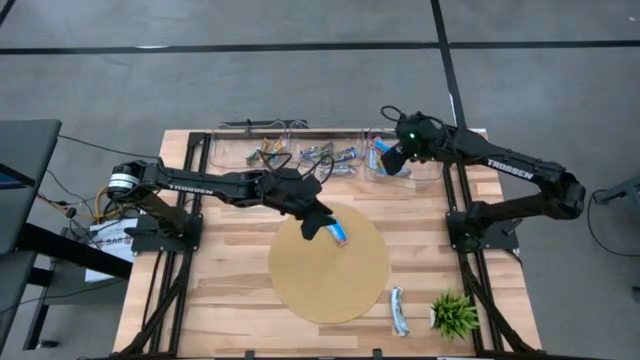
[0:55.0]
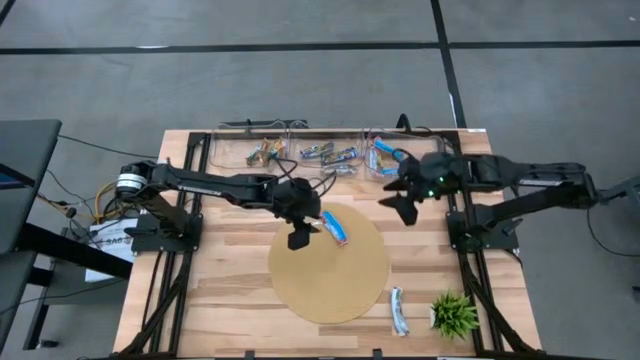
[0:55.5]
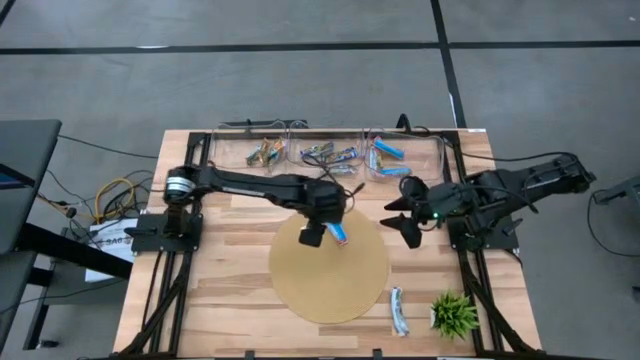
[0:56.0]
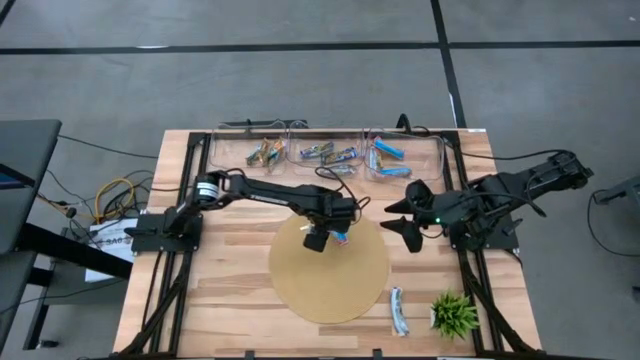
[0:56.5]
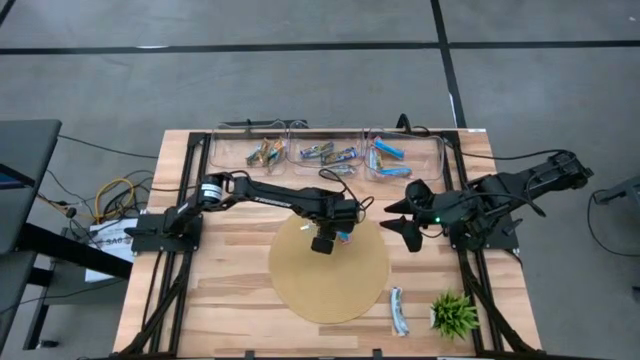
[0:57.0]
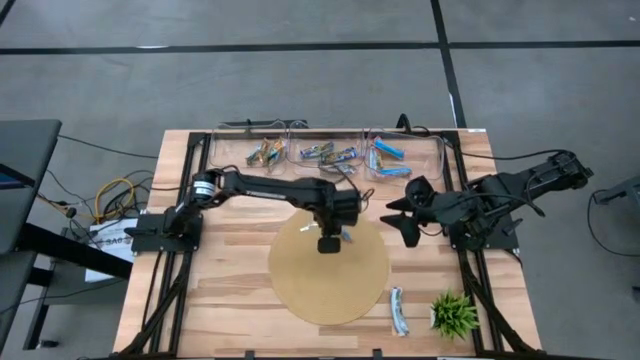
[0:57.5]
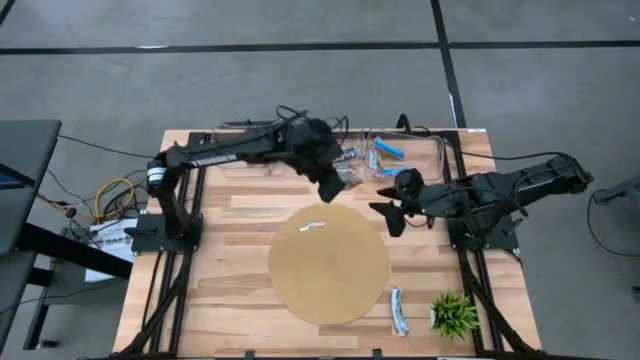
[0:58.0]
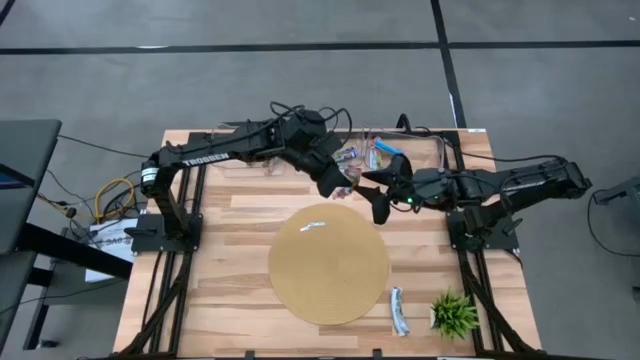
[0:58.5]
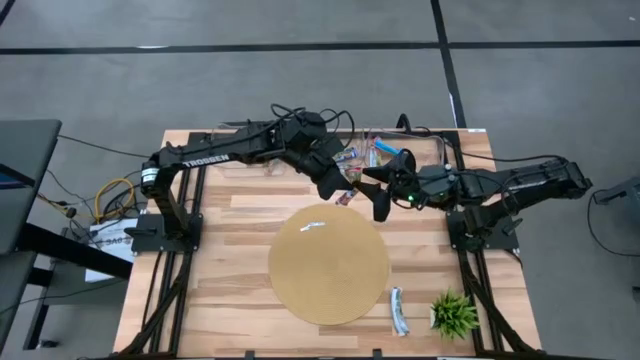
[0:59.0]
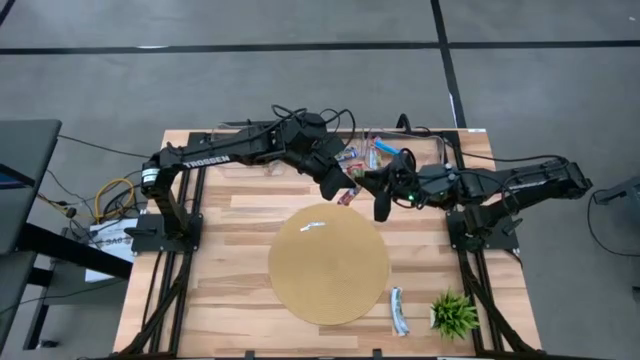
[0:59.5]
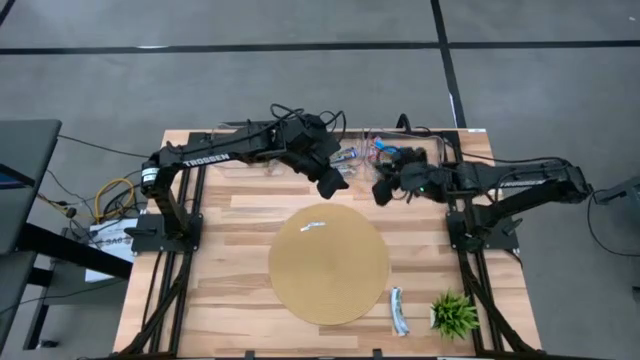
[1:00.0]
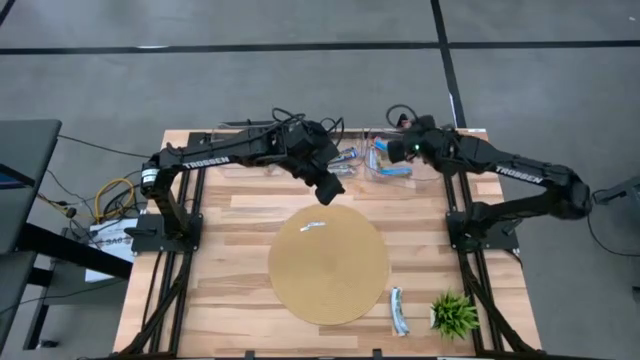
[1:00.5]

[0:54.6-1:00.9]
Task: Pick and place Granola Bars by type
Put the red granola bar into the top right transparent bin

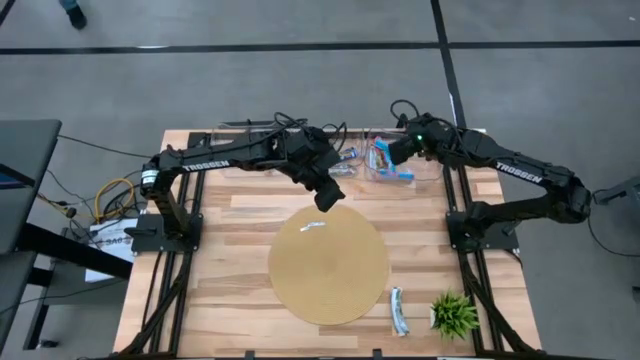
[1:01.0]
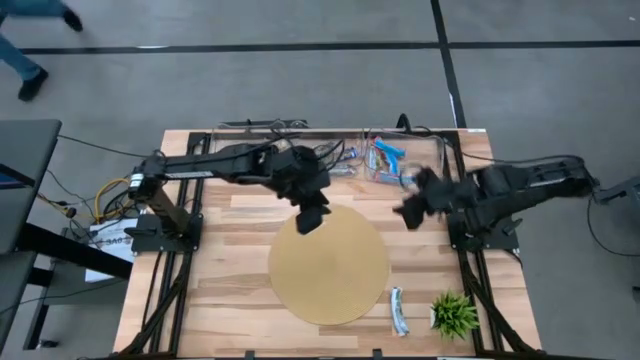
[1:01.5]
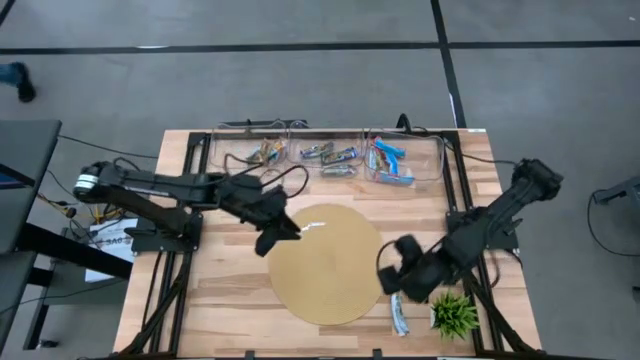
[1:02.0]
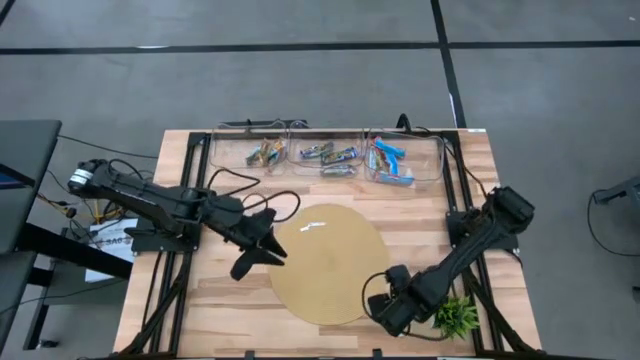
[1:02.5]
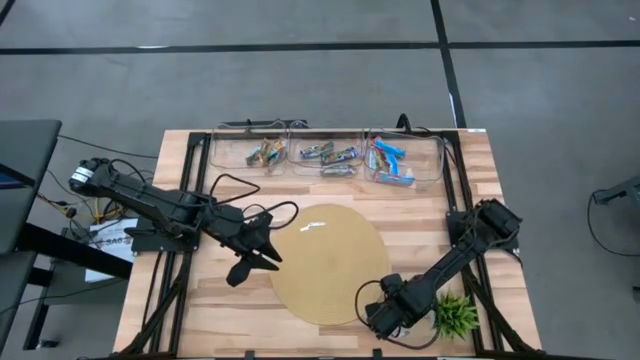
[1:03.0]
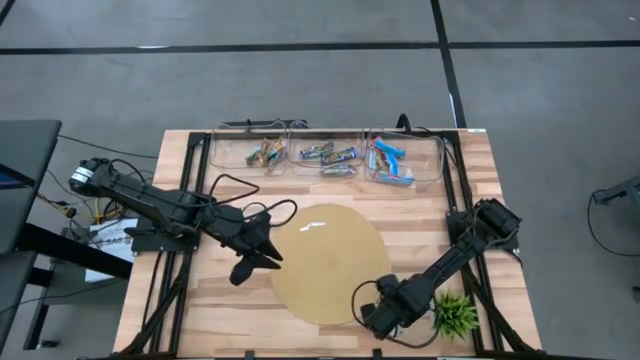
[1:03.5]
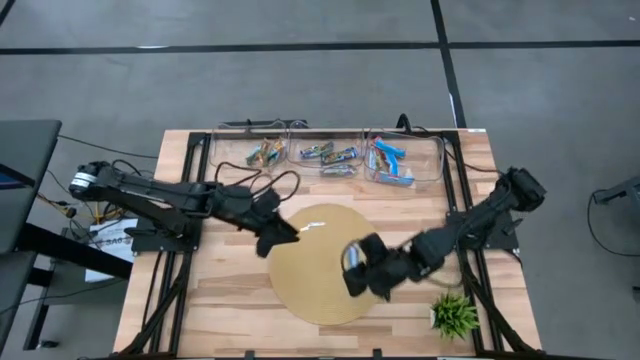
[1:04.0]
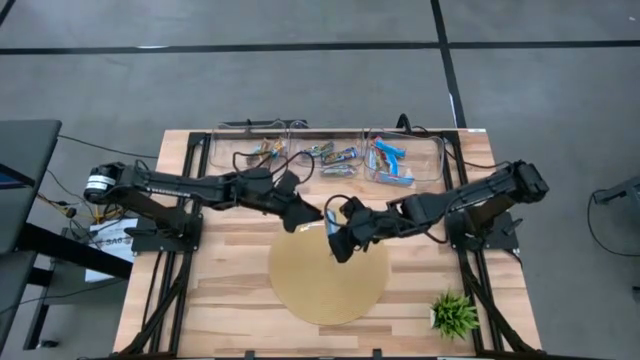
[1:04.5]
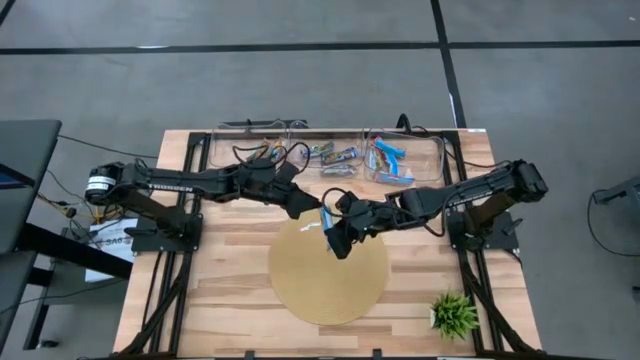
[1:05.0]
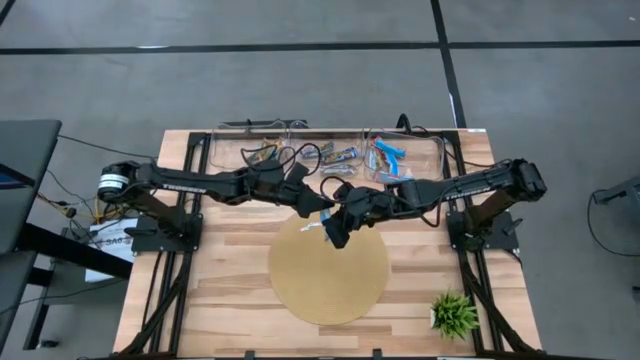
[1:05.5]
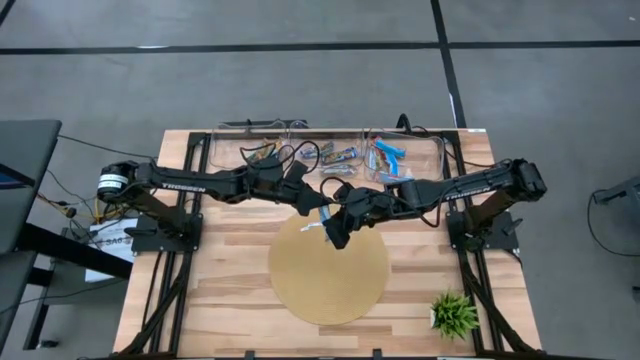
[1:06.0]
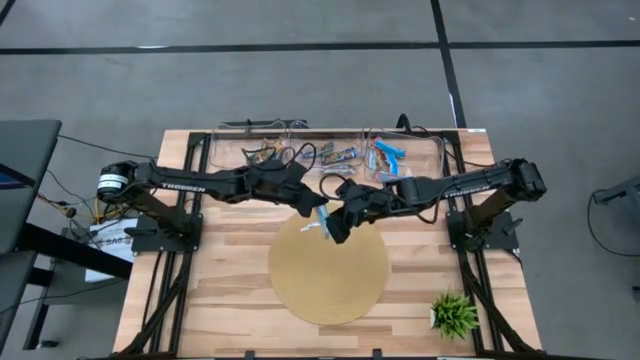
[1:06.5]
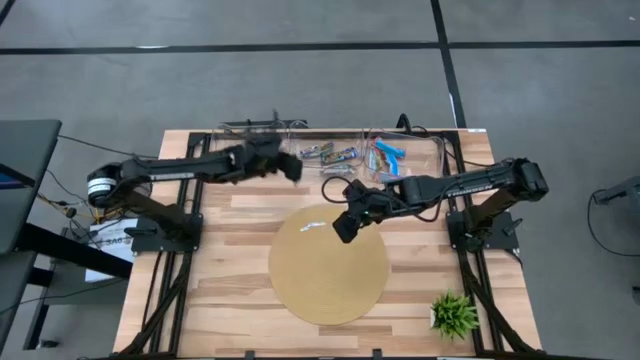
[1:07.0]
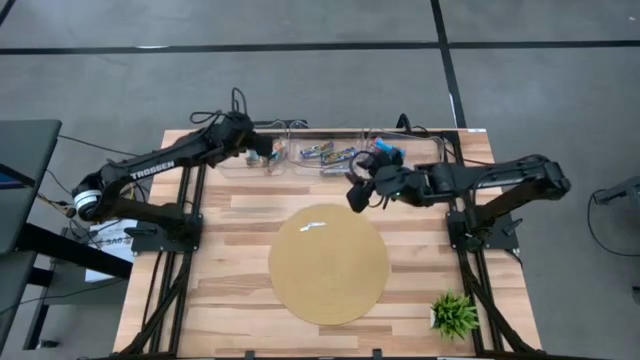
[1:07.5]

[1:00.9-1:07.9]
Put the yellow granola bar into the top left transparent bin

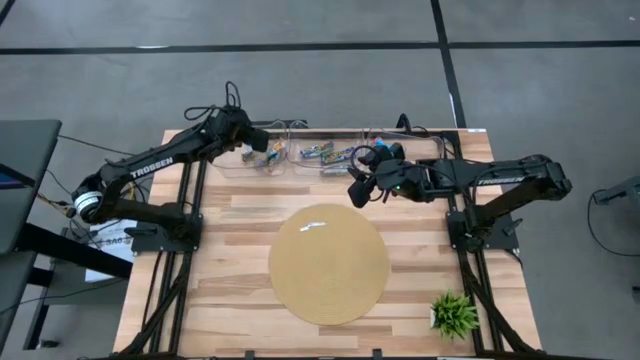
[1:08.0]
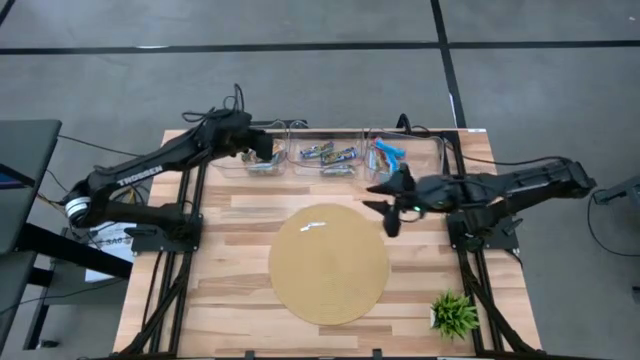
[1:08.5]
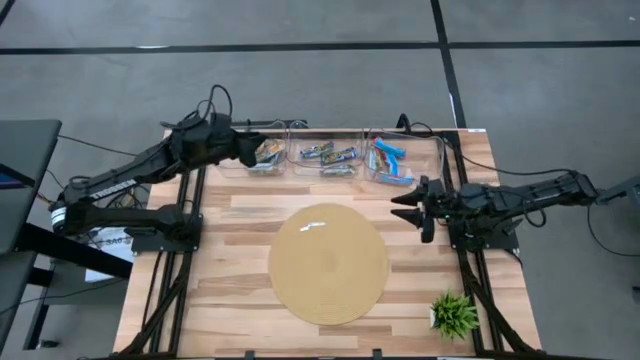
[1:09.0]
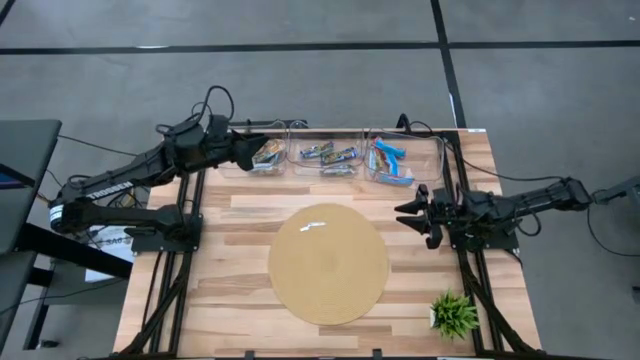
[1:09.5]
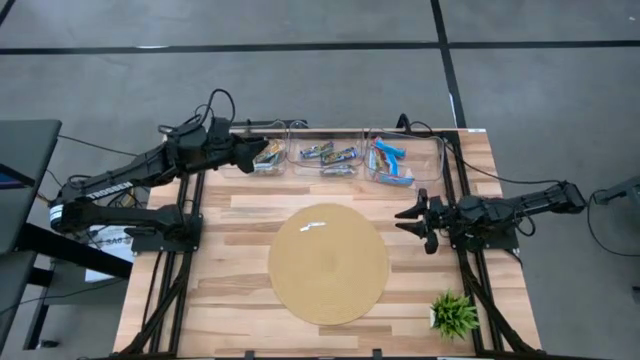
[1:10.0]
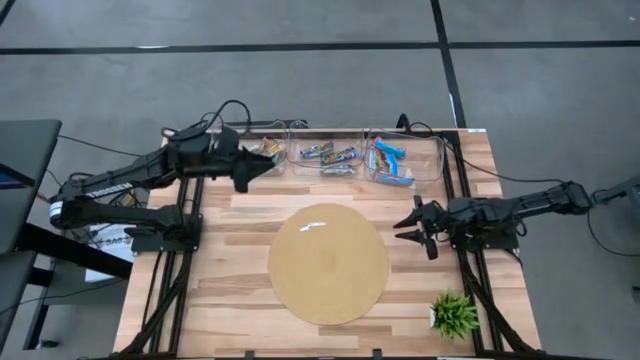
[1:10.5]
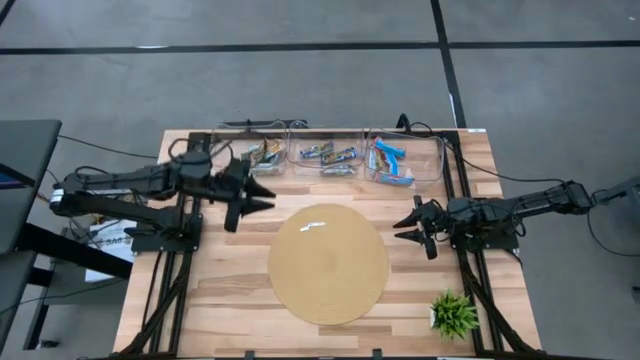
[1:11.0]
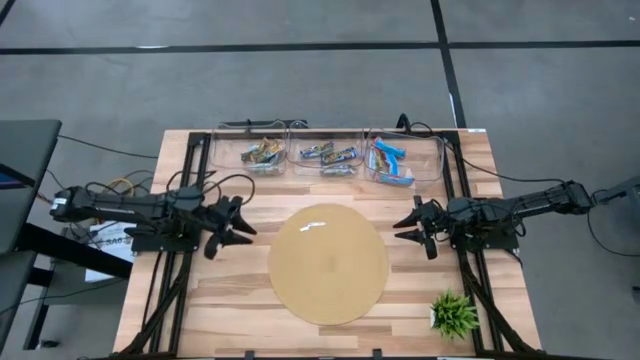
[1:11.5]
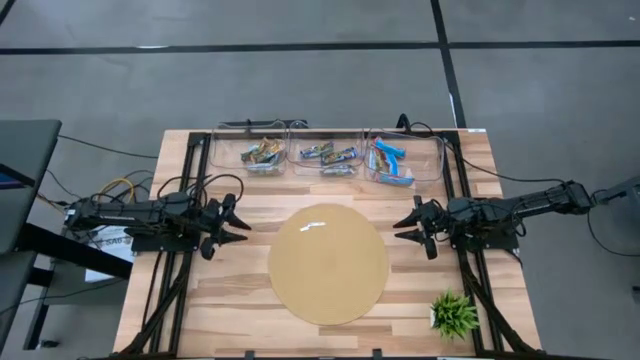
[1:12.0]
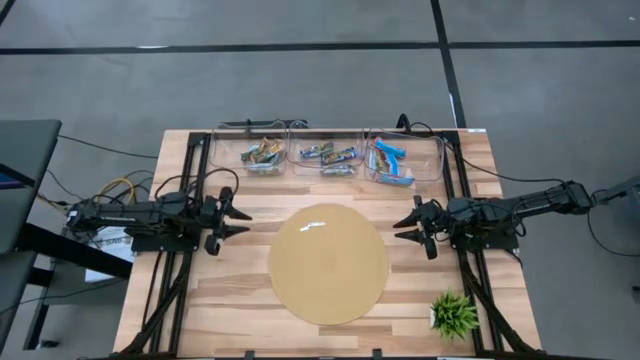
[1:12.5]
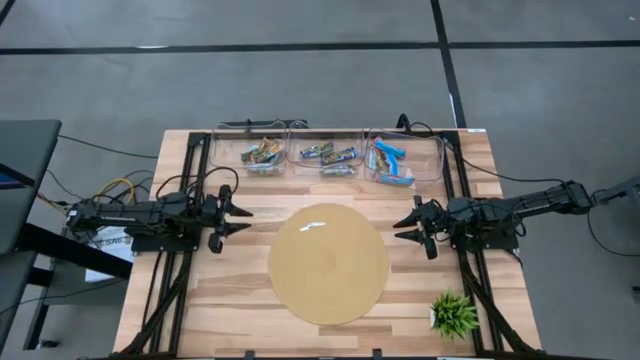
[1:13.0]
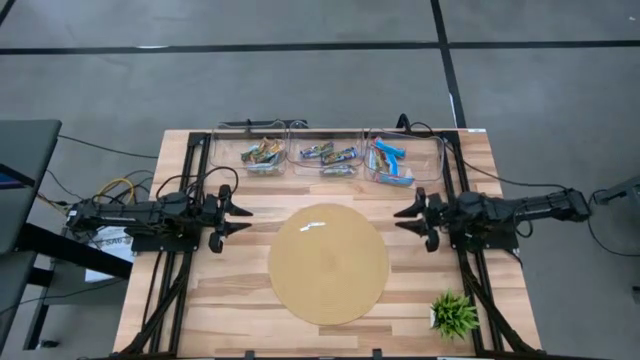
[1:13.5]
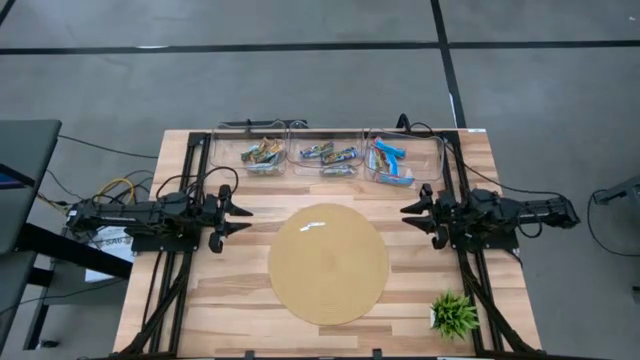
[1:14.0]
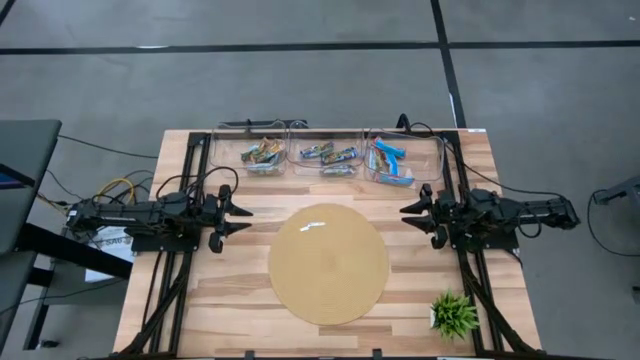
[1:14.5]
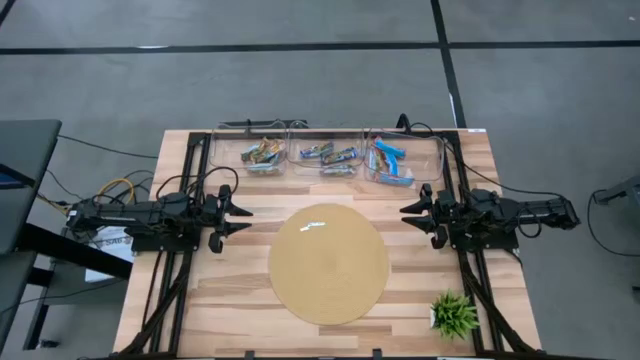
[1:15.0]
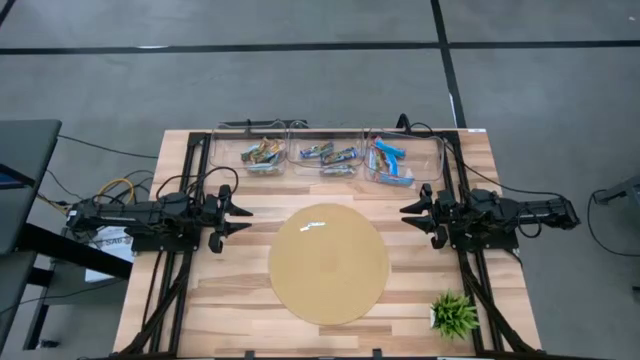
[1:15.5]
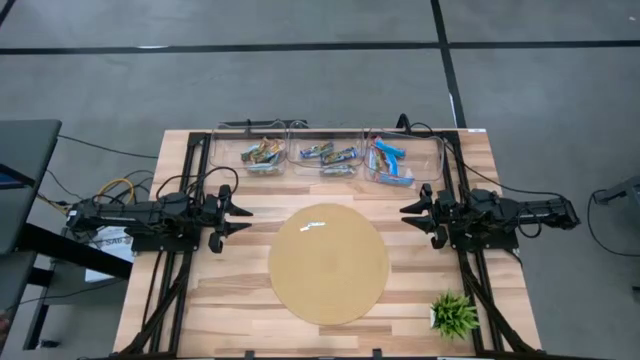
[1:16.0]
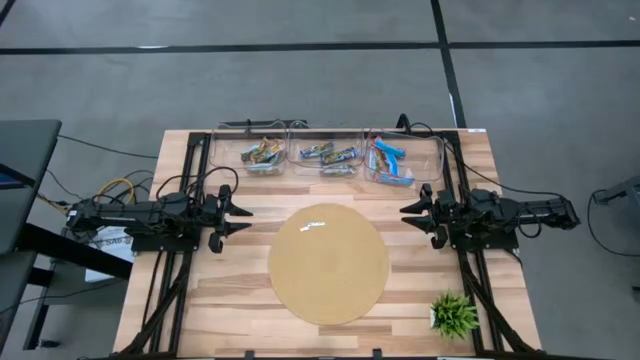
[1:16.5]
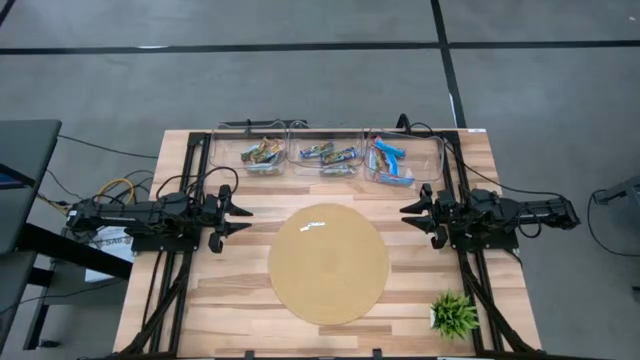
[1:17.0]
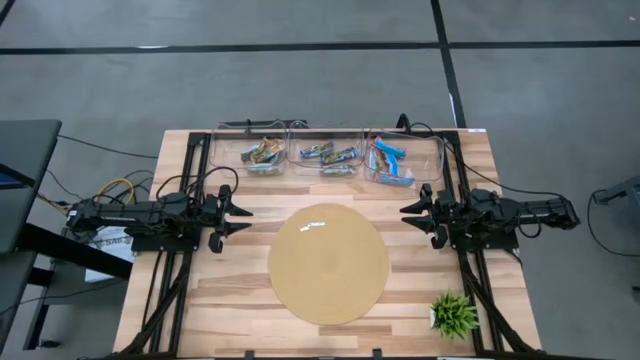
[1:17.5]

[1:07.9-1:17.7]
Return to Home Position
